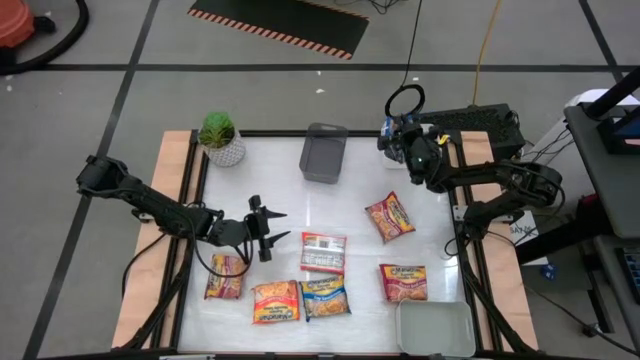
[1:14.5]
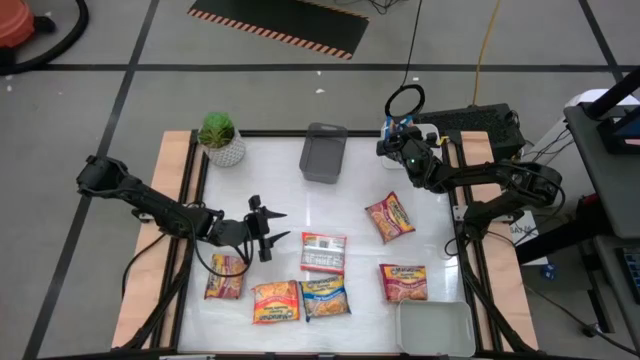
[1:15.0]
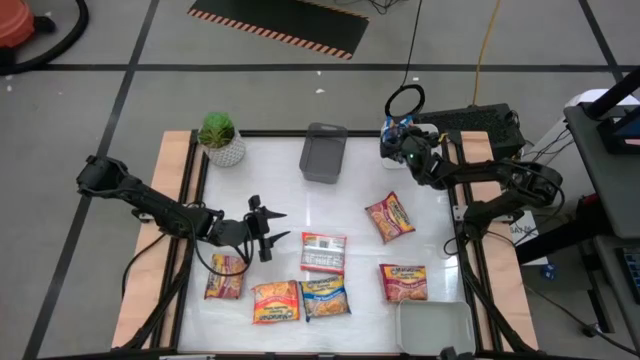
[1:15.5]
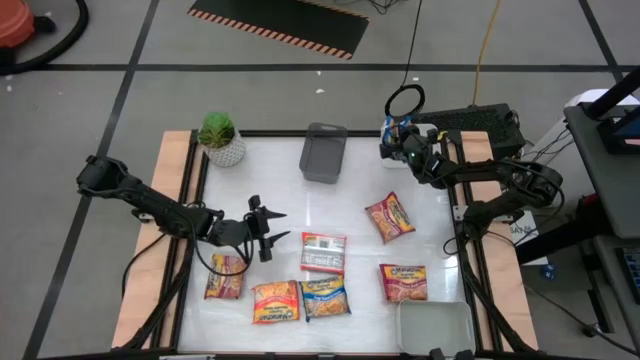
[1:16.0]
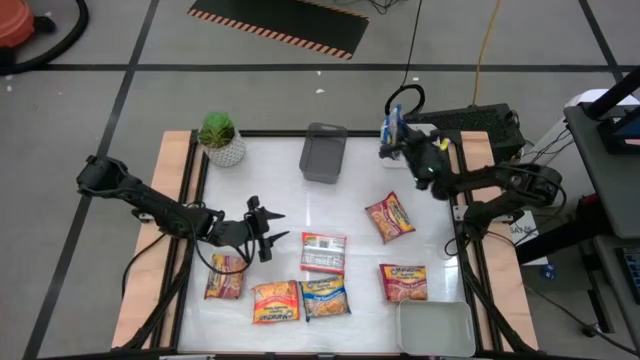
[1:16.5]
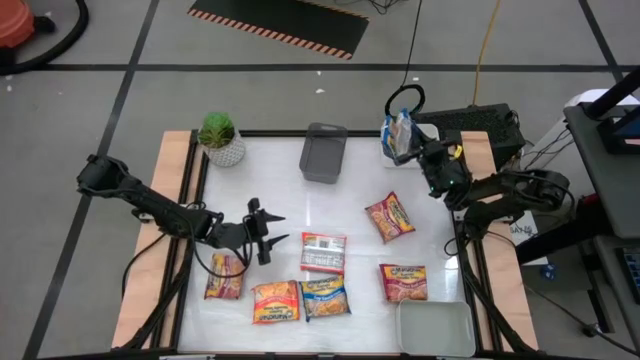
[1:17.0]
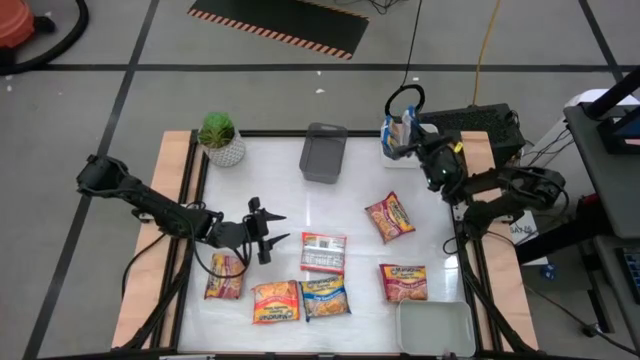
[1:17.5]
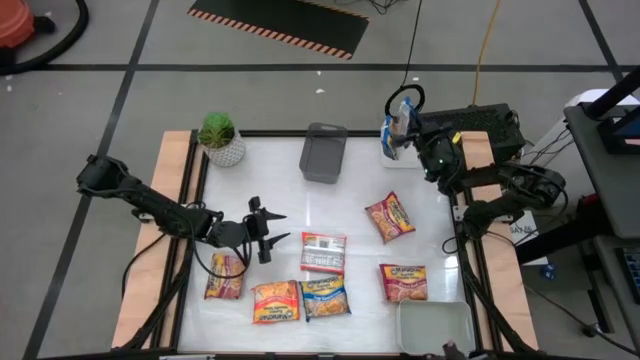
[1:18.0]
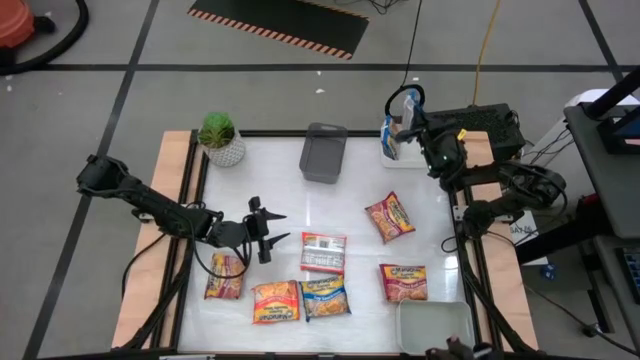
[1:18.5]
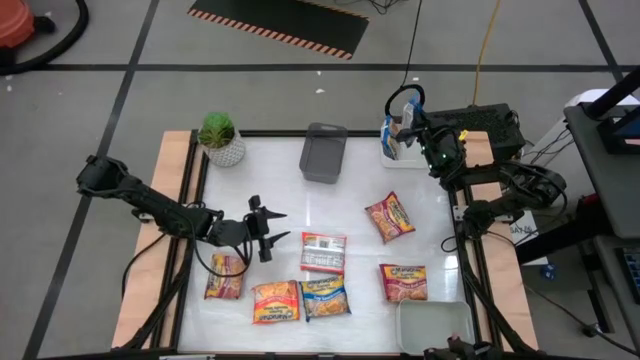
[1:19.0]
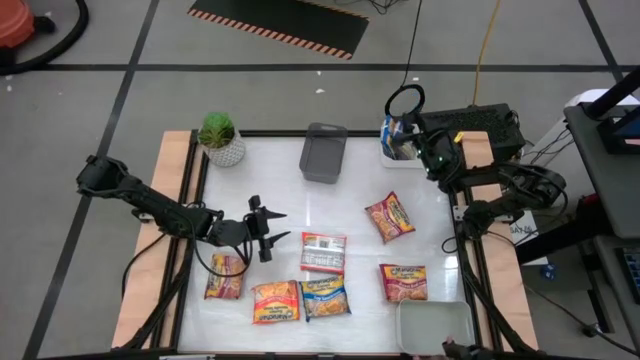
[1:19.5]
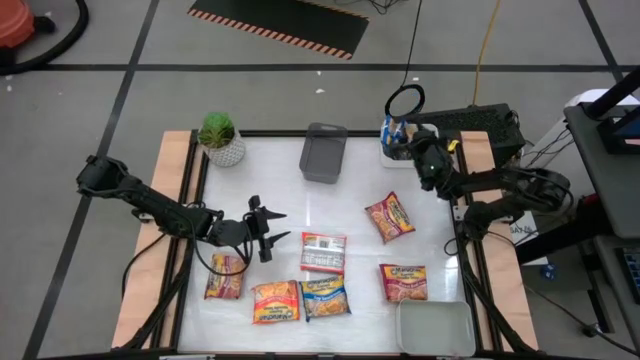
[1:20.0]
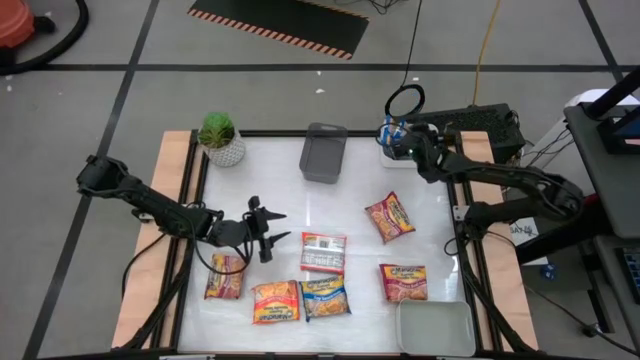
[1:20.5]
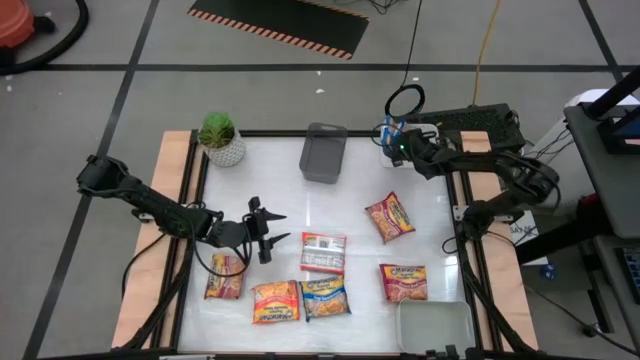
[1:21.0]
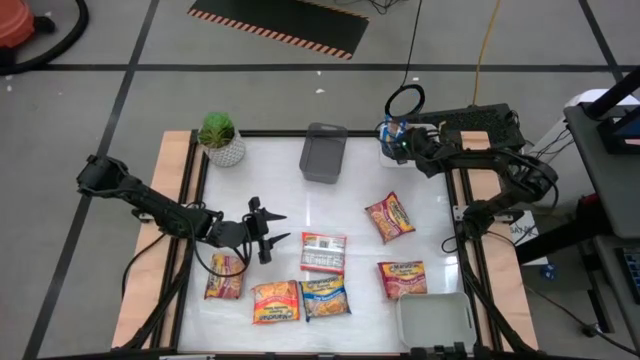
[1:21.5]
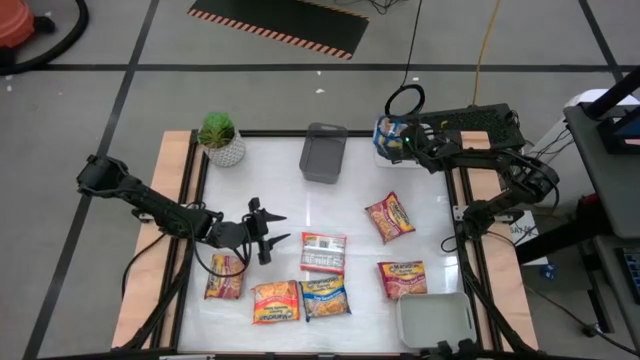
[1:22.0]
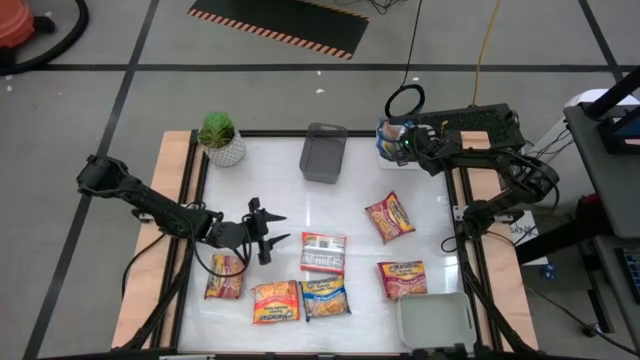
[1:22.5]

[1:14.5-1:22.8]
Task: Sort Maruchan noodles
Put the top blue noodle pack into the white bin

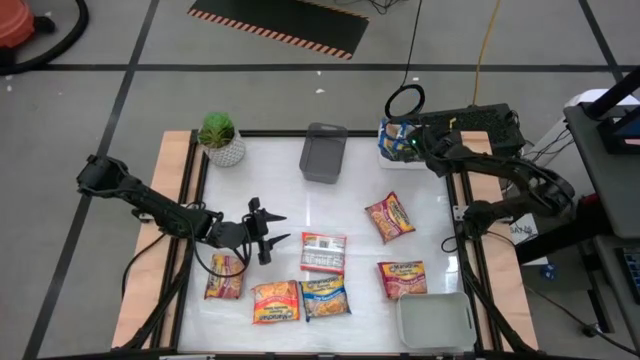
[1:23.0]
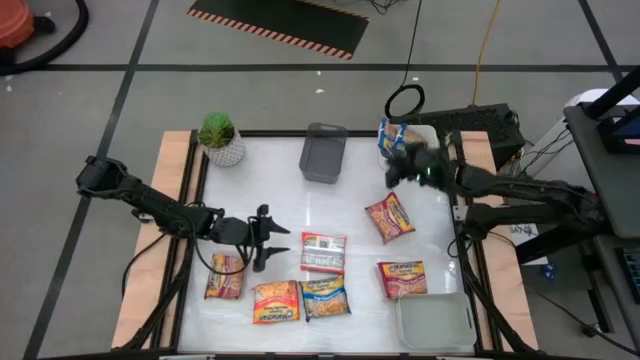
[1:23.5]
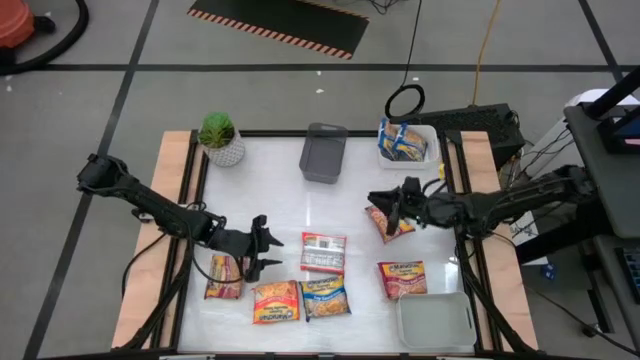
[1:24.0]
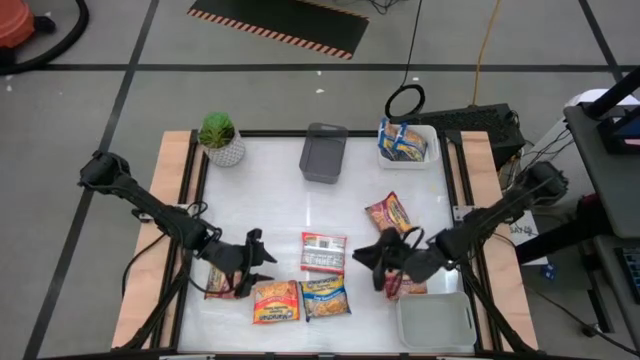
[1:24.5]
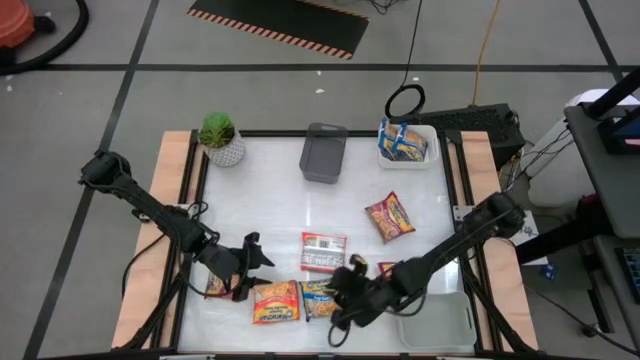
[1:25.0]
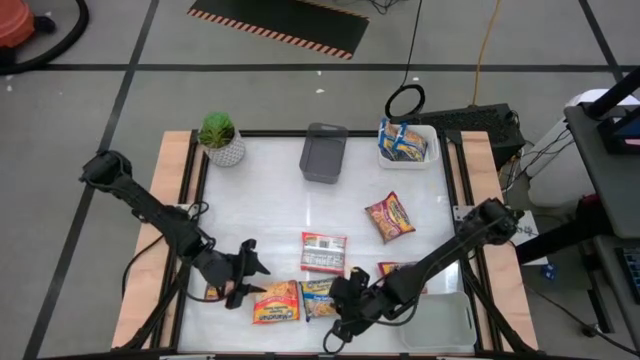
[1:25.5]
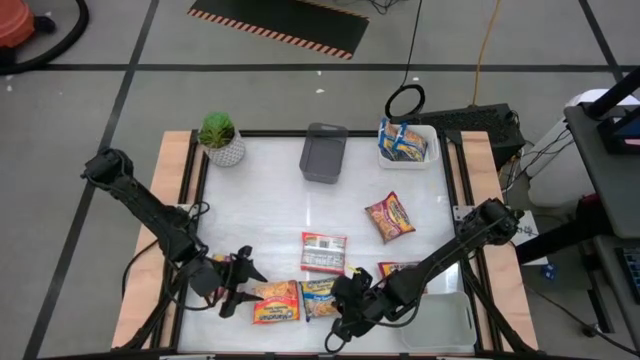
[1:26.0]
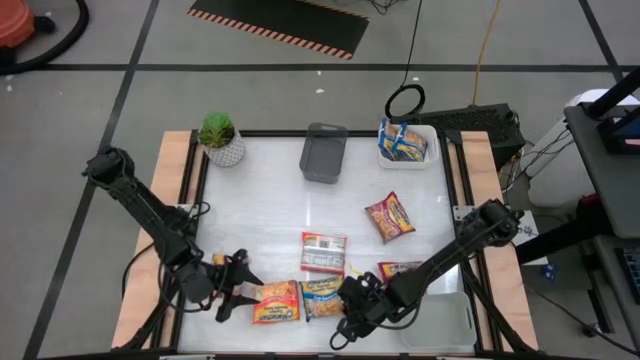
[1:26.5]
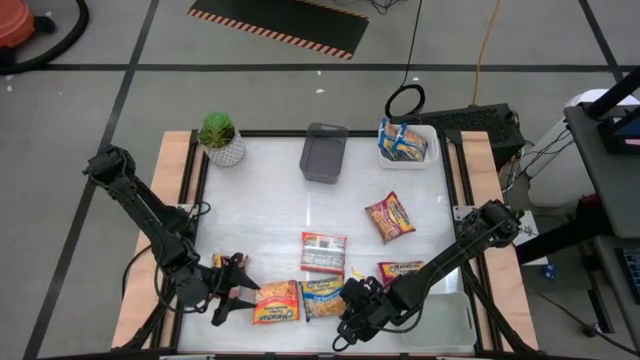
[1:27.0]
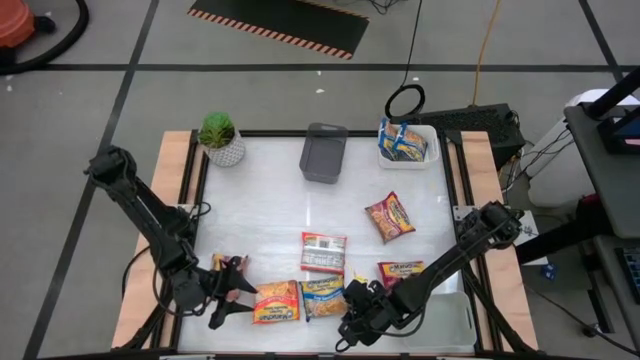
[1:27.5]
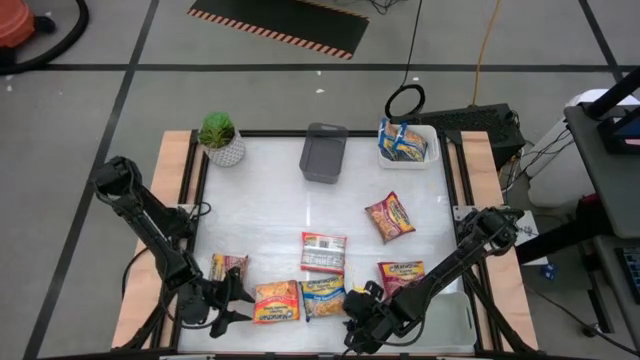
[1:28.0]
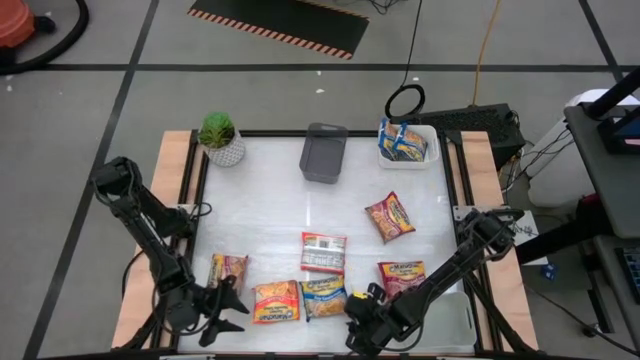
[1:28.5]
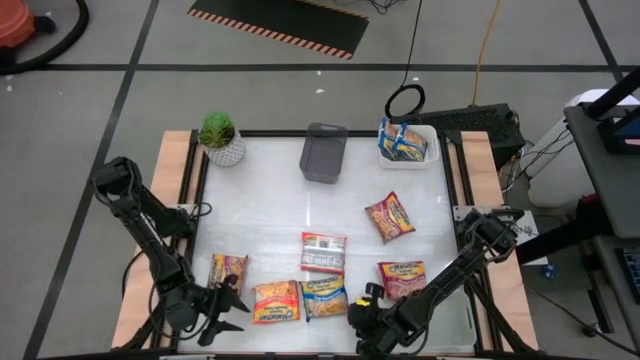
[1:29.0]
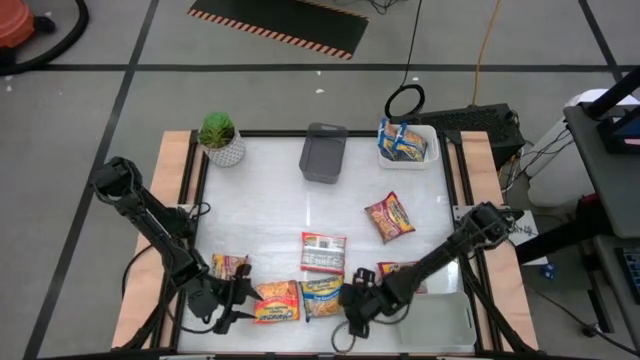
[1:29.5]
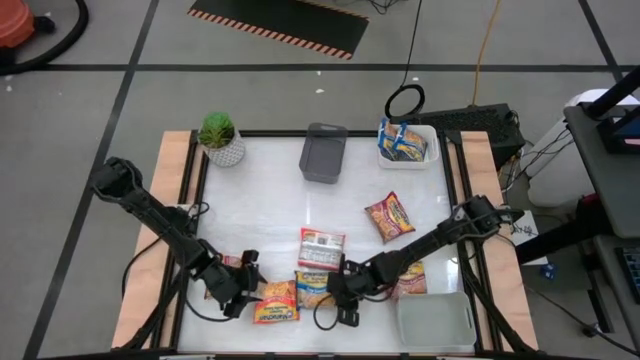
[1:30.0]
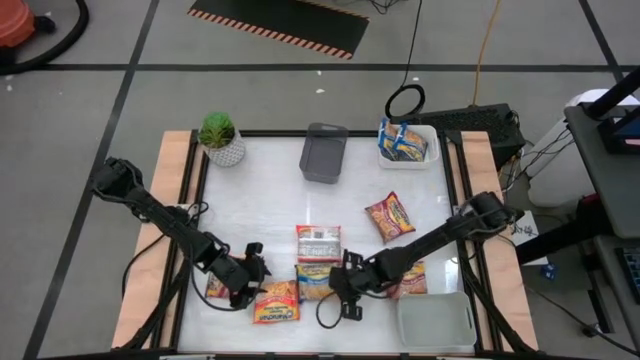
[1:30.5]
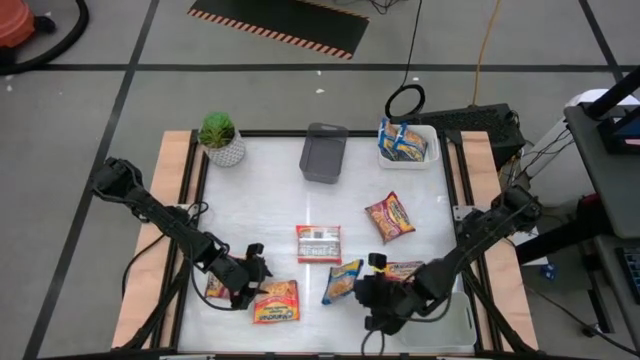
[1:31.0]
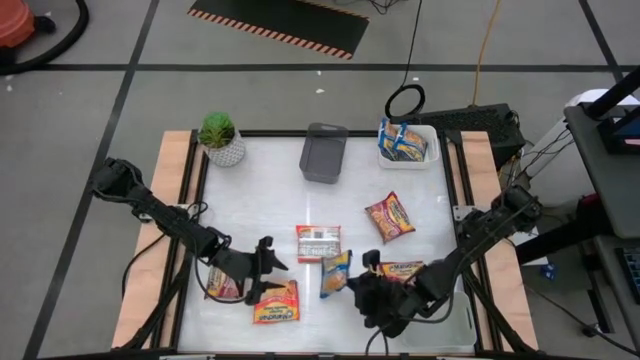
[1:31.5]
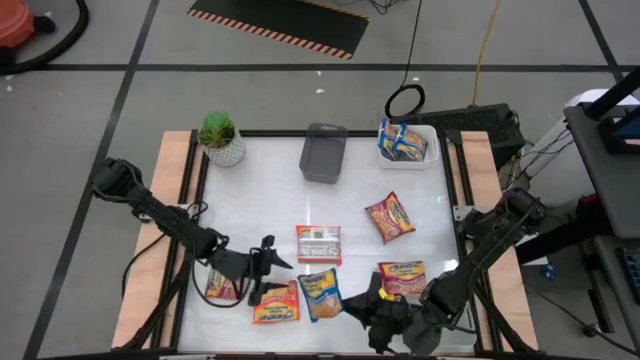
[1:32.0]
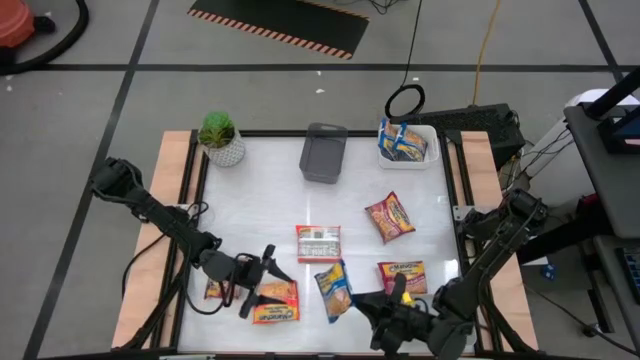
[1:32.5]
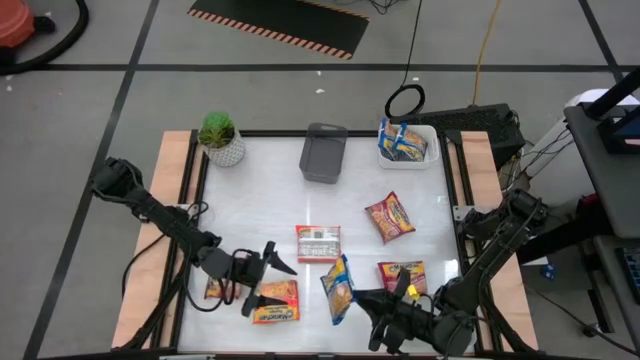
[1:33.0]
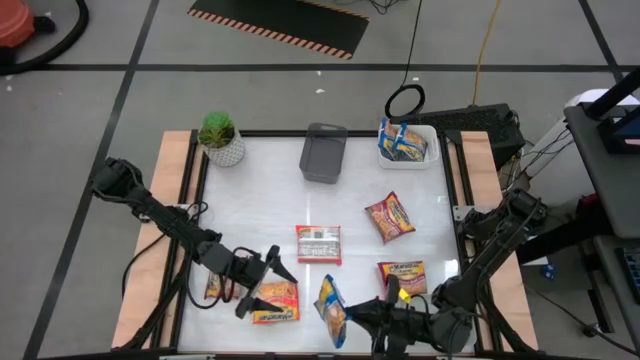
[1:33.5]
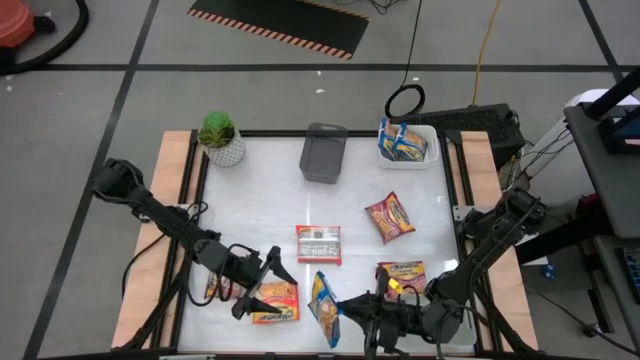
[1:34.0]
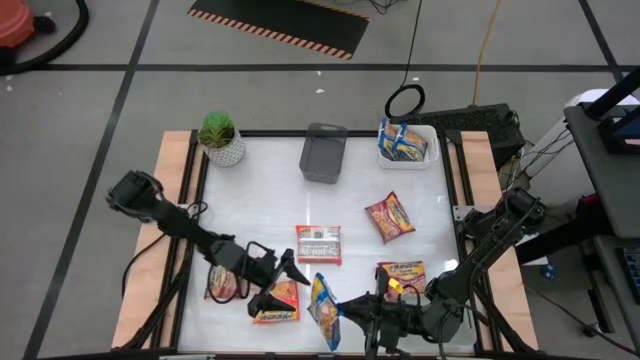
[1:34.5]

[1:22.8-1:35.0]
Put the blue noodle pack into the white bin

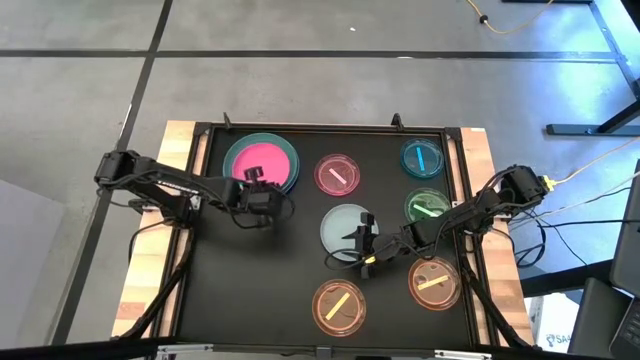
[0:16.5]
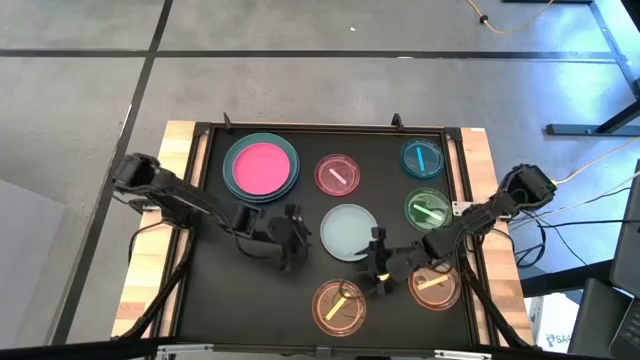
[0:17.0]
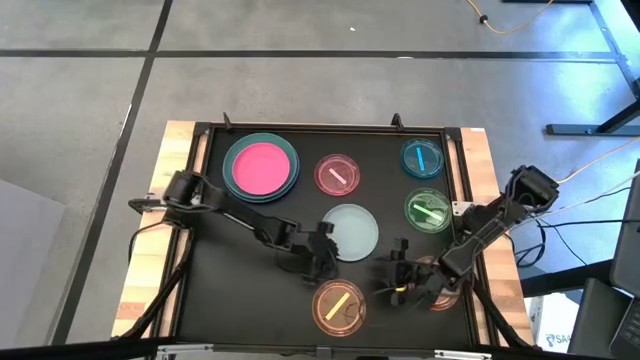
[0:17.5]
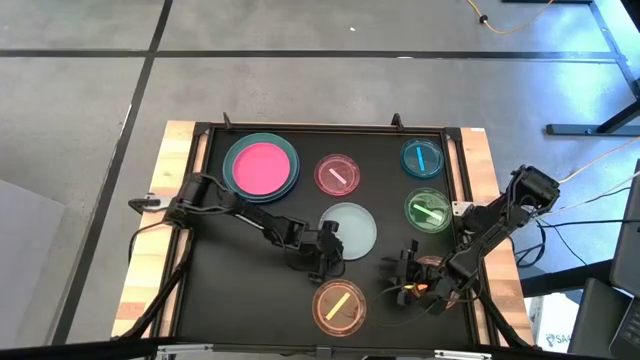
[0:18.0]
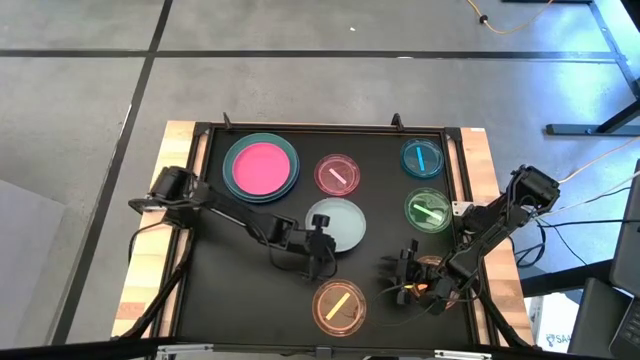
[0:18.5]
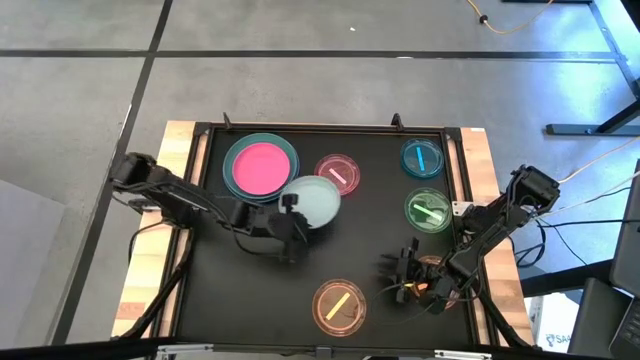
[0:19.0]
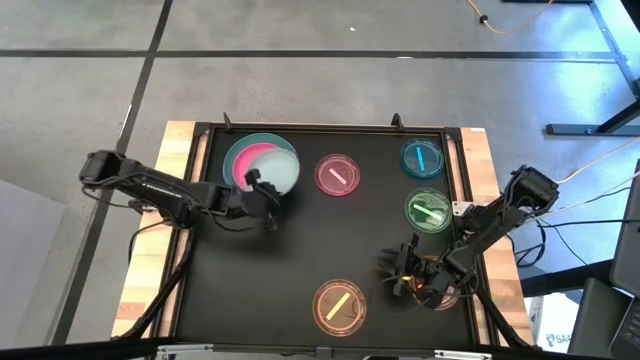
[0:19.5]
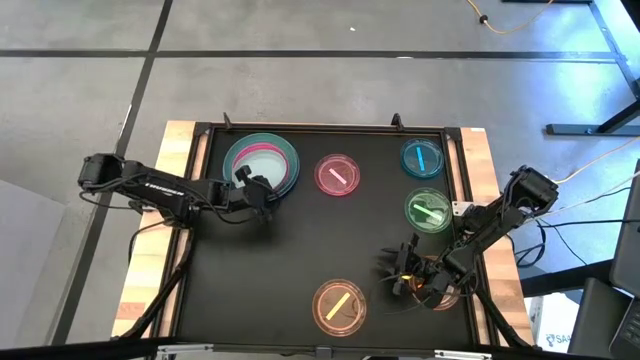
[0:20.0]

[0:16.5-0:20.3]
Task: Stack plastic plates
Stack the gray plate on top of the pink plate
